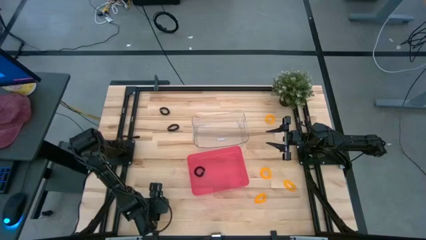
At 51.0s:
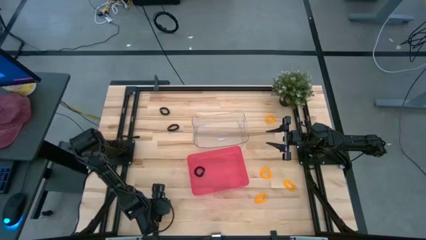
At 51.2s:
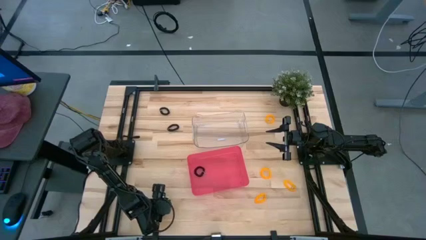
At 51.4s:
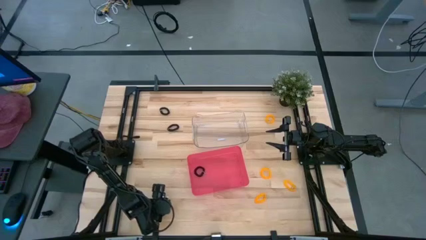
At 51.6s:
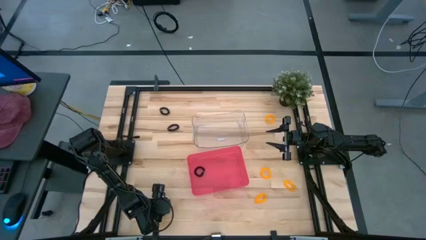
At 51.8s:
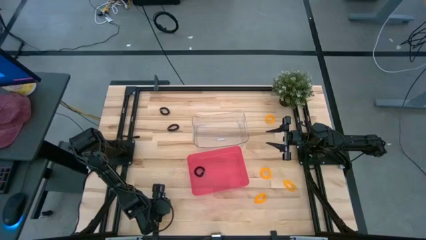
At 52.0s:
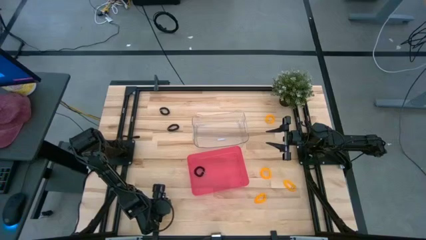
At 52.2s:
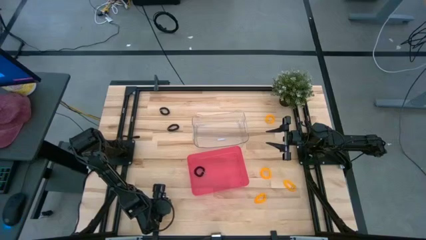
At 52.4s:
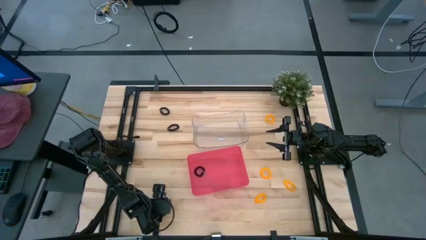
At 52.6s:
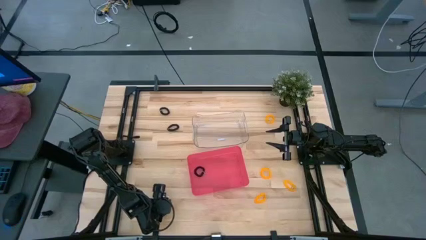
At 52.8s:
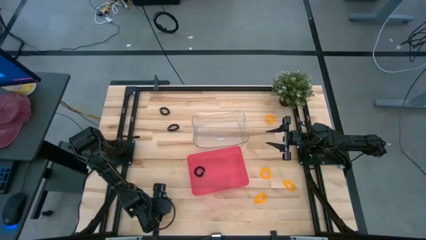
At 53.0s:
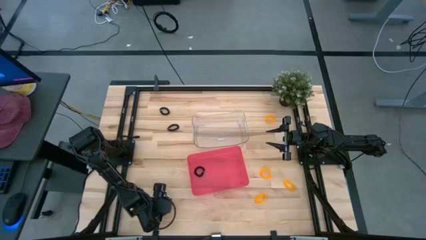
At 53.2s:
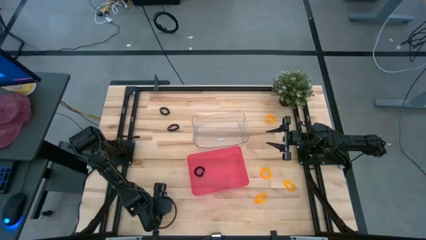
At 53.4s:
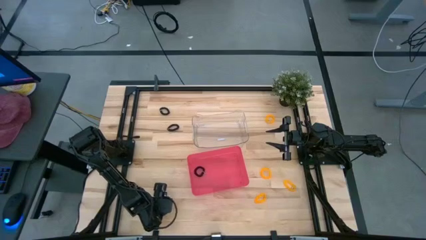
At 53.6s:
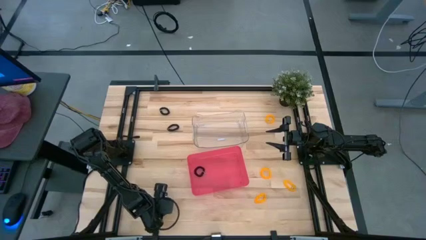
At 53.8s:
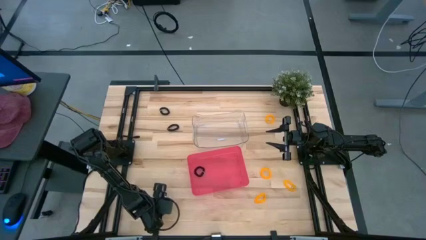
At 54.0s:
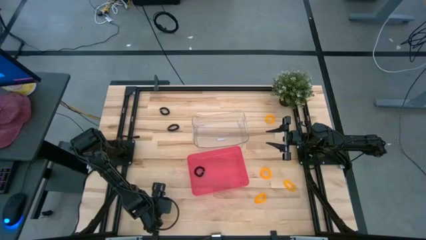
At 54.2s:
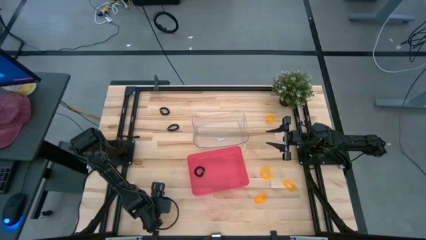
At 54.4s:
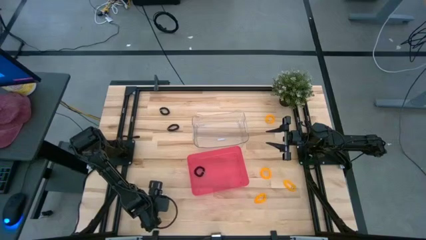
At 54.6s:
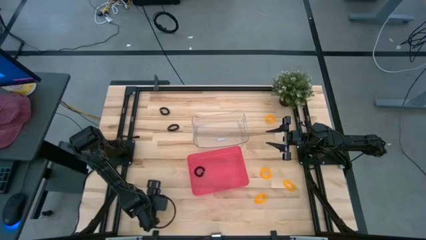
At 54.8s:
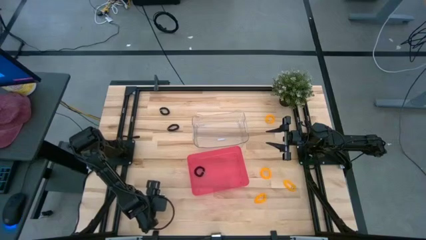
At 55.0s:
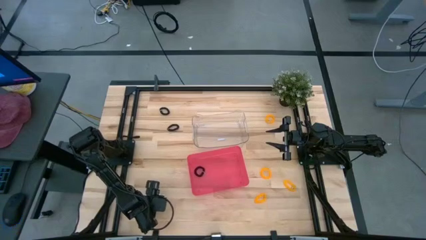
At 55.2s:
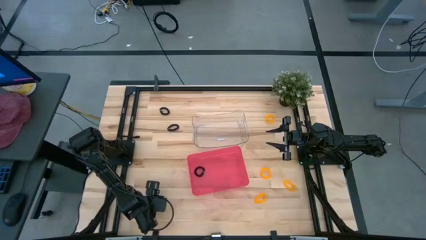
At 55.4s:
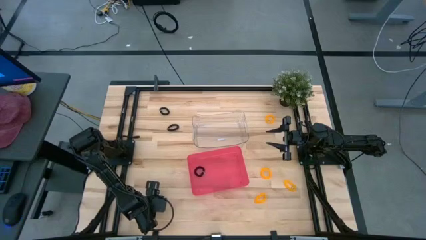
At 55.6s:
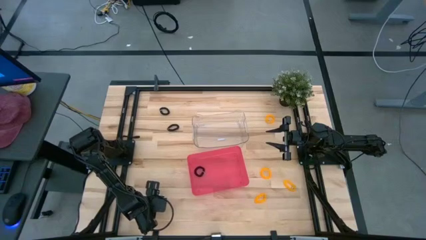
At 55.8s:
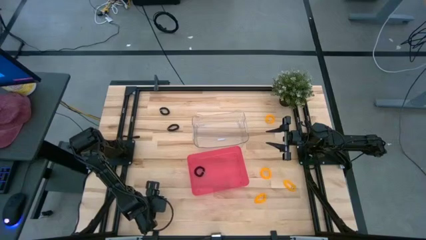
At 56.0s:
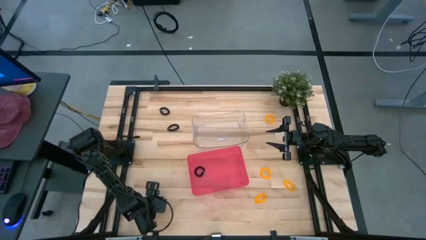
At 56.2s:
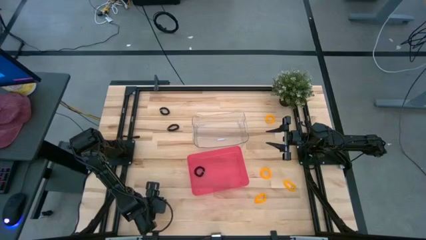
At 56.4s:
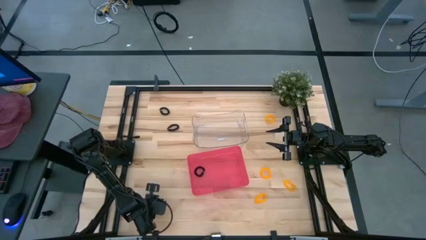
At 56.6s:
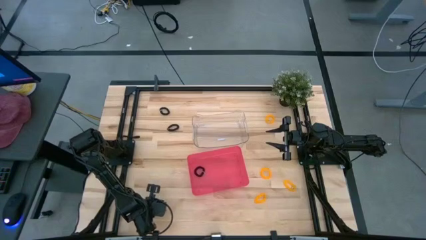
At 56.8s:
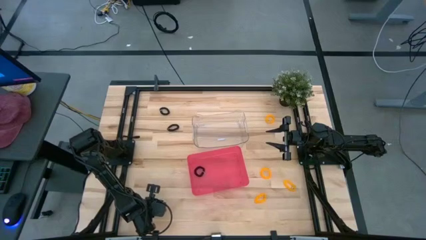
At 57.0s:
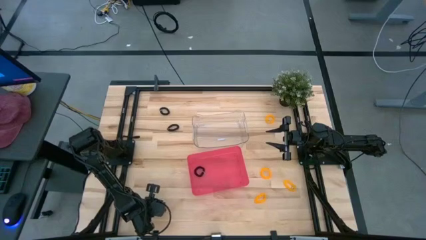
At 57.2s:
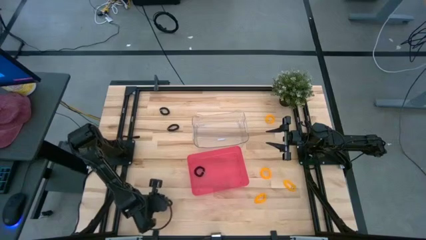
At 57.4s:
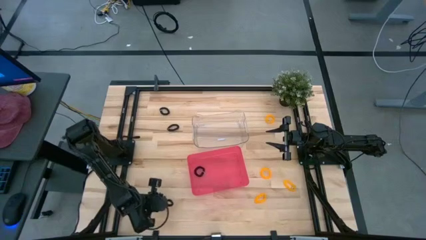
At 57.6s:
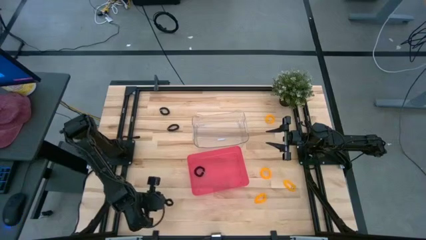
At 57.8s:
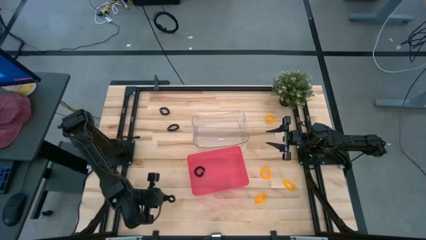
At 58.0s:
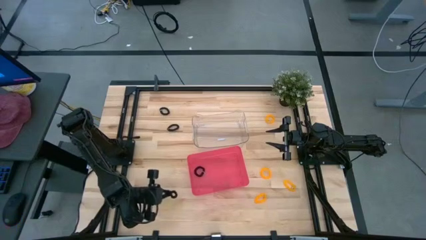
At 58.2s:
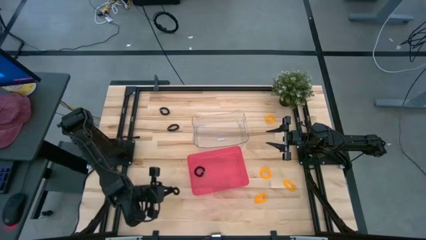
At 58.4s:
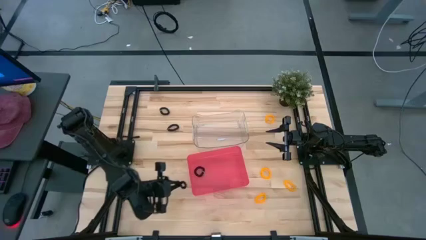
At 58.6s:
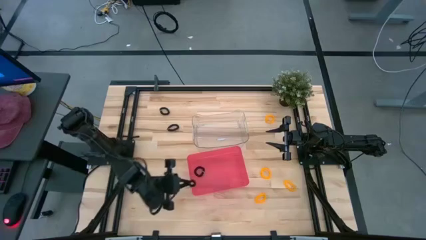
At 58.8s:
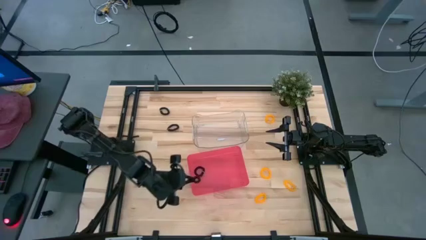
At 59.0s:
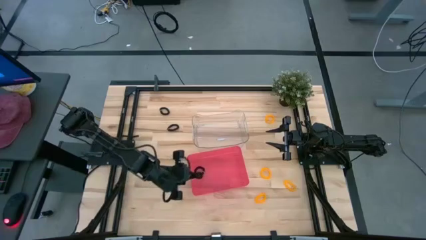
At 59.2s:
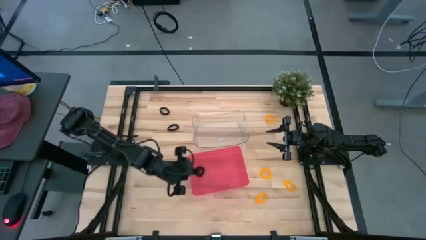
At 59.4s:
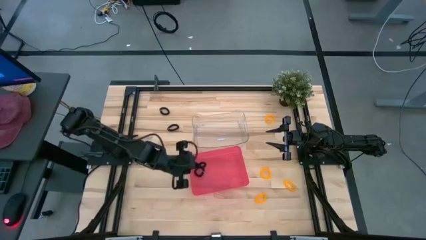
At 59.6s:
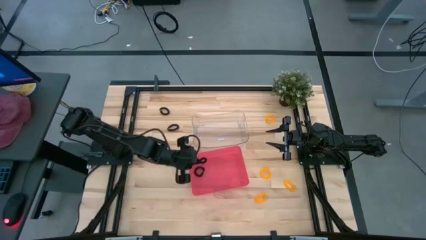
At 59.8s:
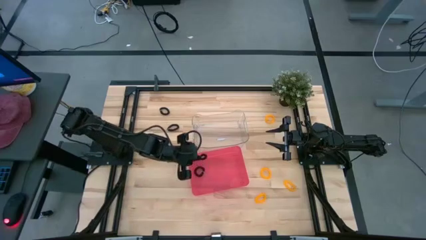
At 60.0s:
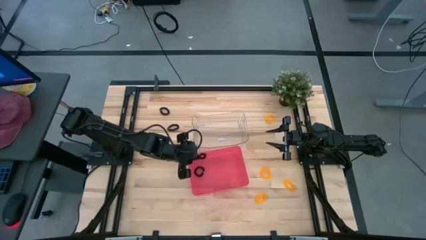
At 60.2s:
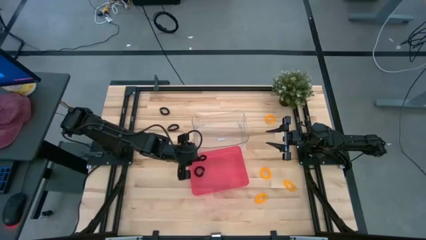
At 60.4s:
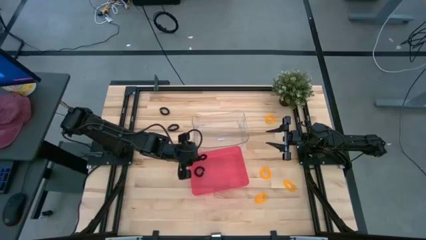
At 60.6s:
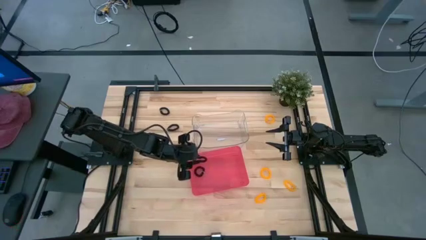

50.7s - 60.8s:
Task: Sort spring keychains
Put the bottom black spring keychain into the red bin
